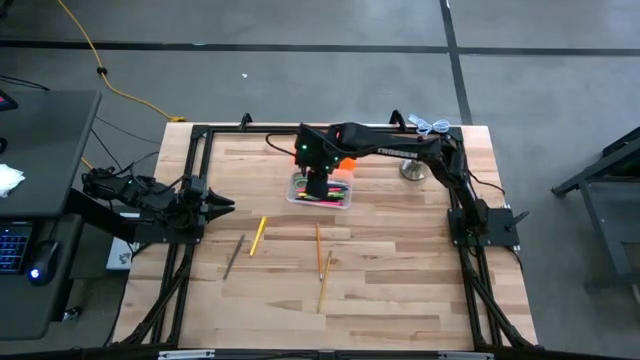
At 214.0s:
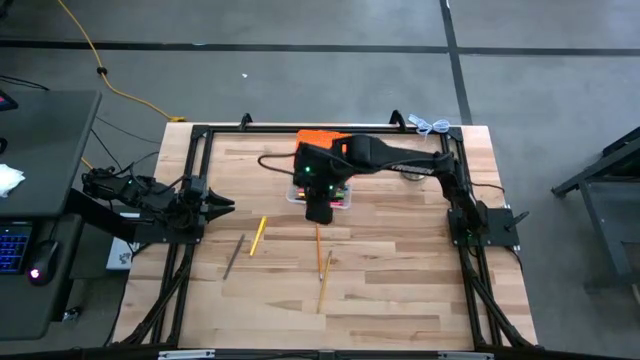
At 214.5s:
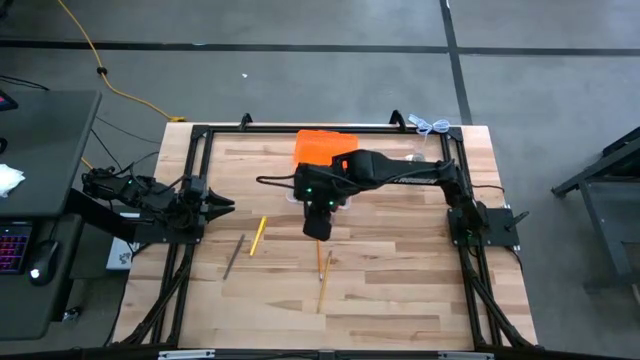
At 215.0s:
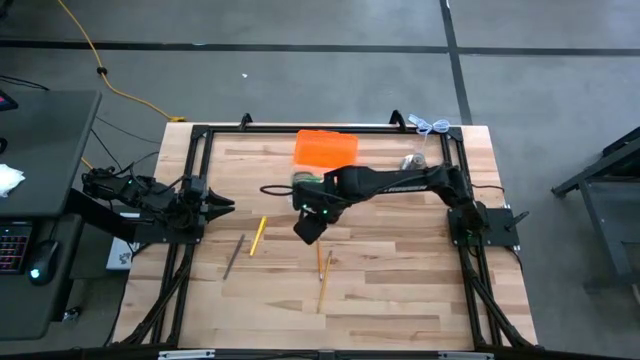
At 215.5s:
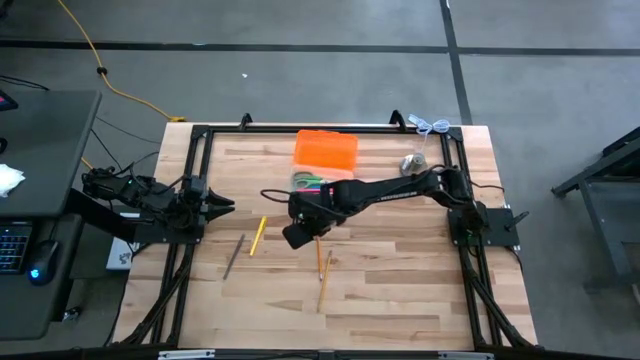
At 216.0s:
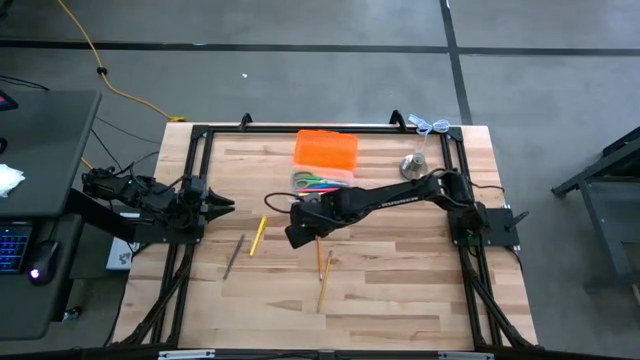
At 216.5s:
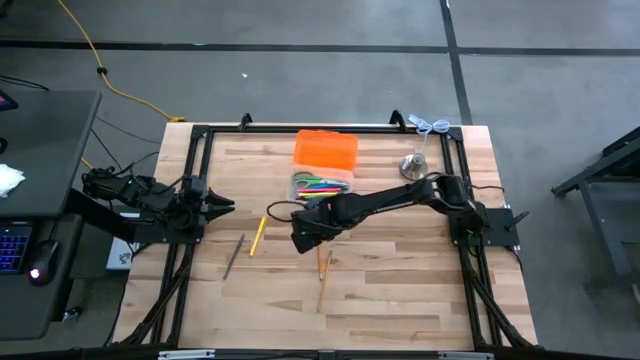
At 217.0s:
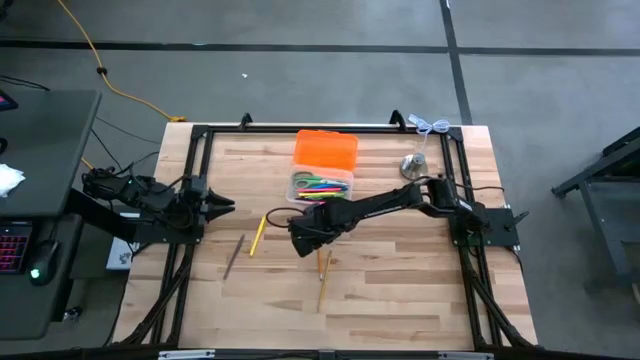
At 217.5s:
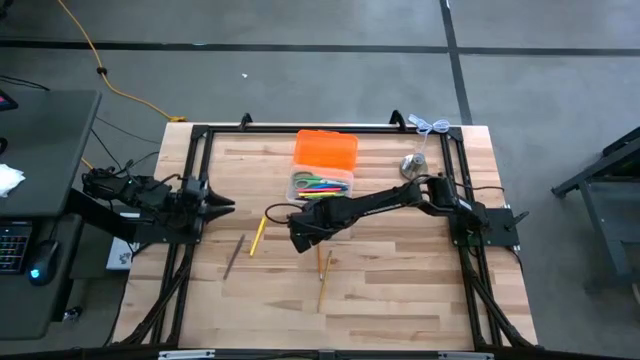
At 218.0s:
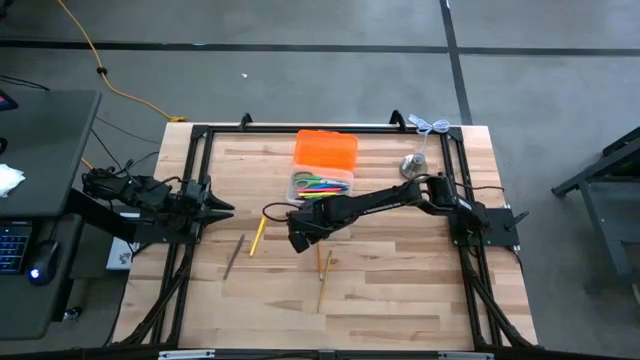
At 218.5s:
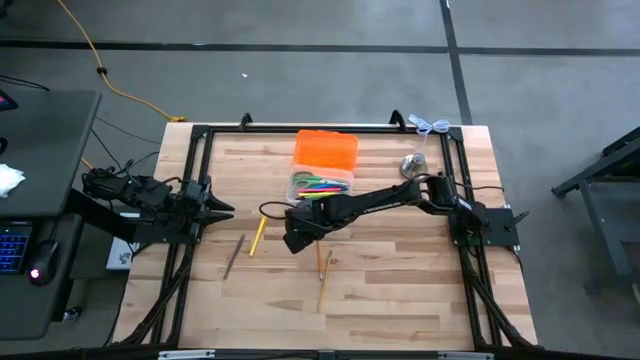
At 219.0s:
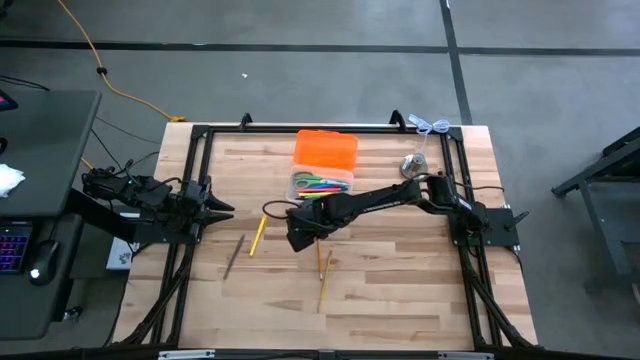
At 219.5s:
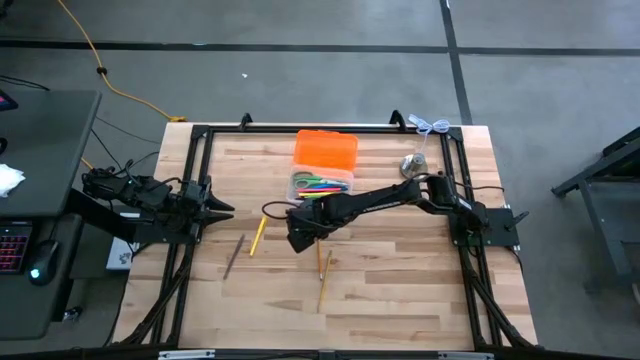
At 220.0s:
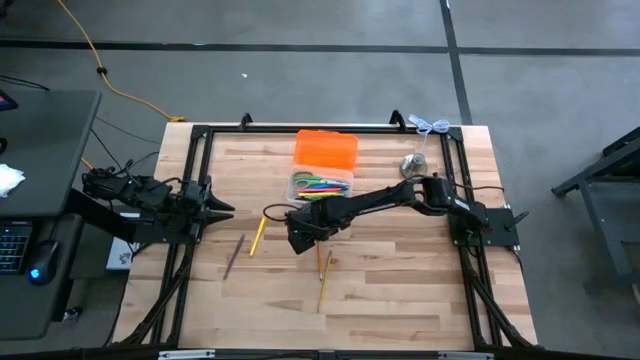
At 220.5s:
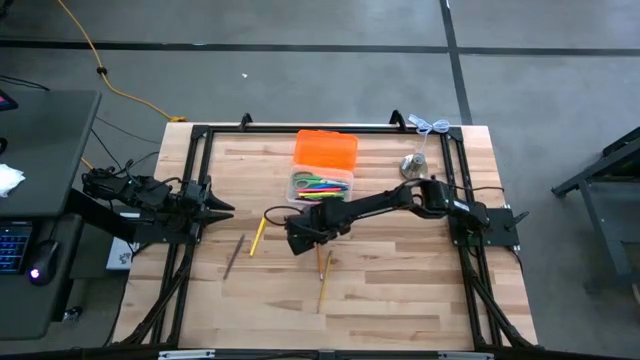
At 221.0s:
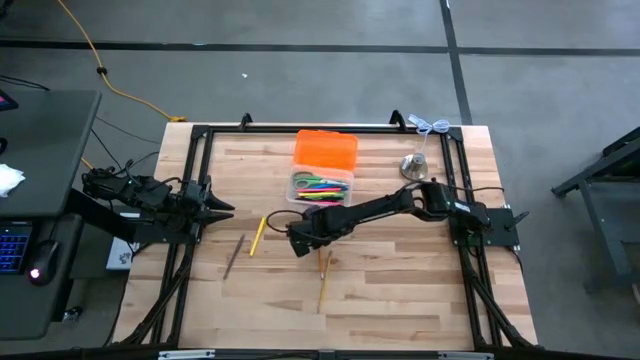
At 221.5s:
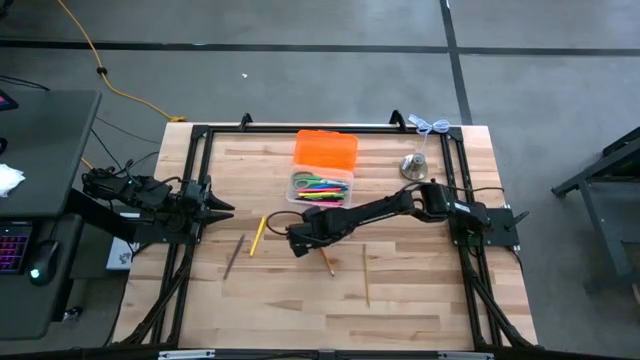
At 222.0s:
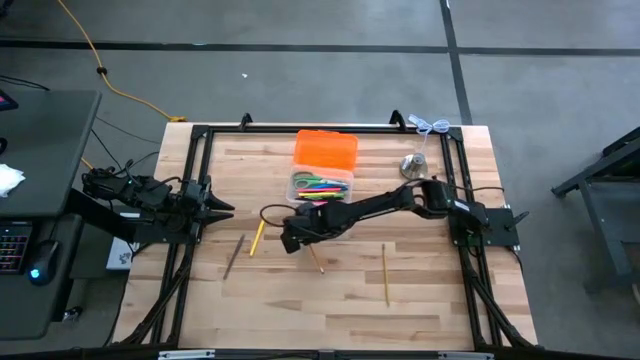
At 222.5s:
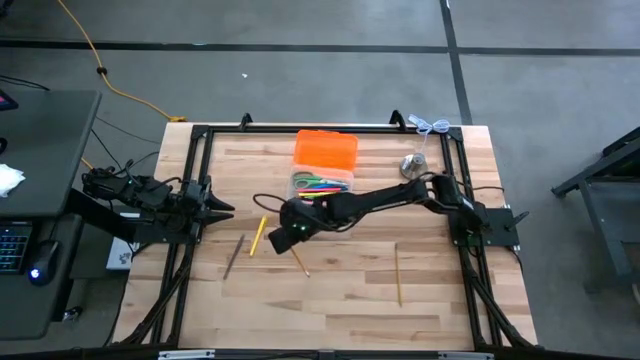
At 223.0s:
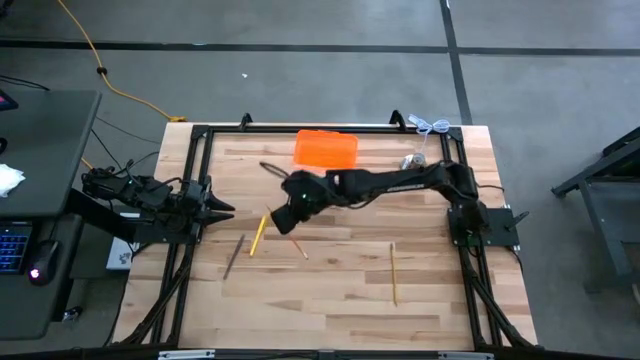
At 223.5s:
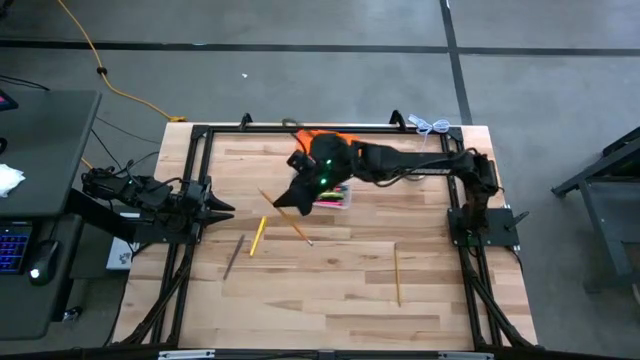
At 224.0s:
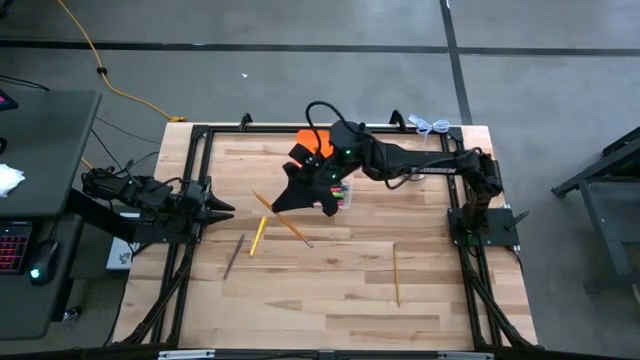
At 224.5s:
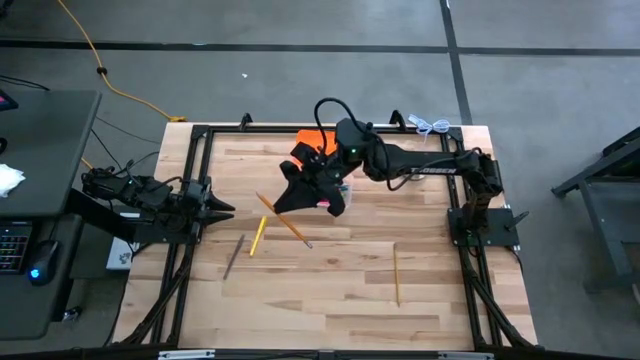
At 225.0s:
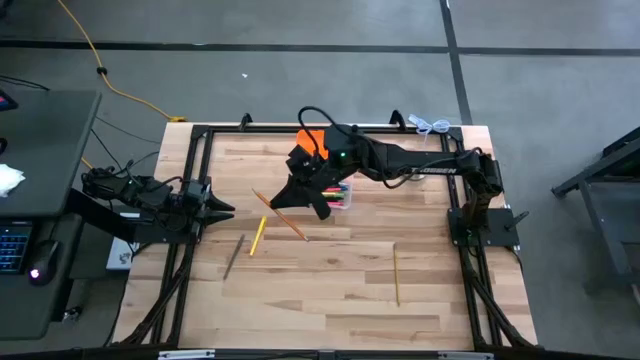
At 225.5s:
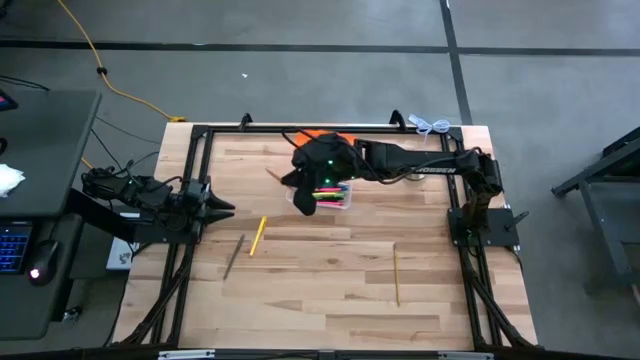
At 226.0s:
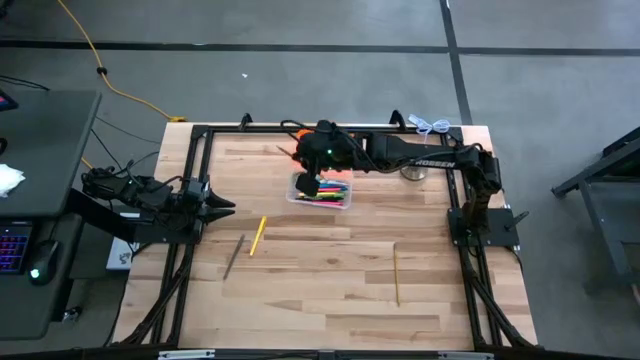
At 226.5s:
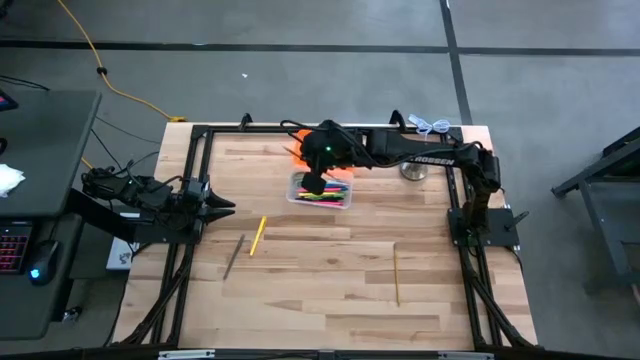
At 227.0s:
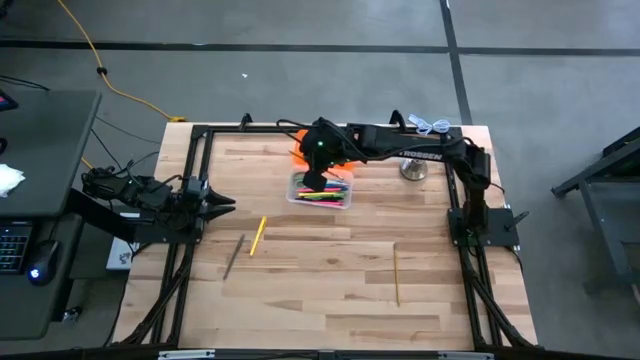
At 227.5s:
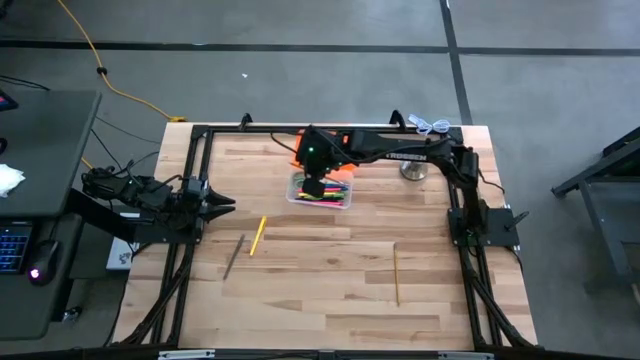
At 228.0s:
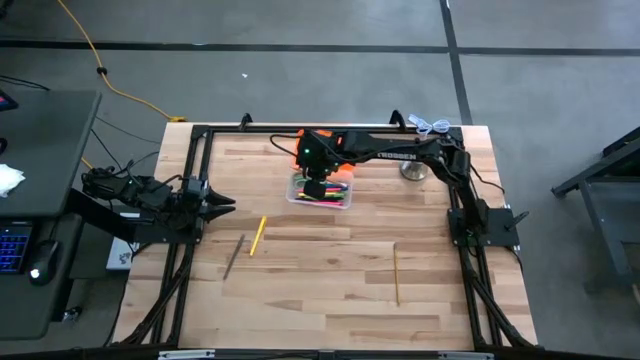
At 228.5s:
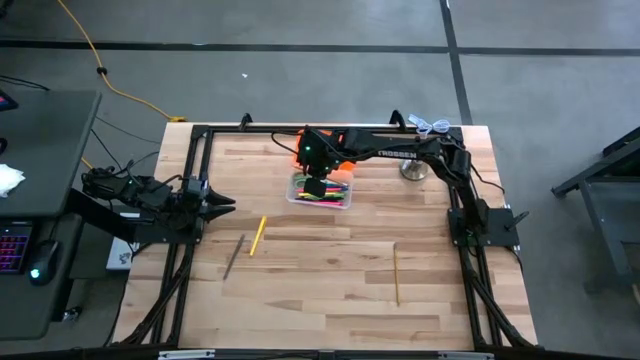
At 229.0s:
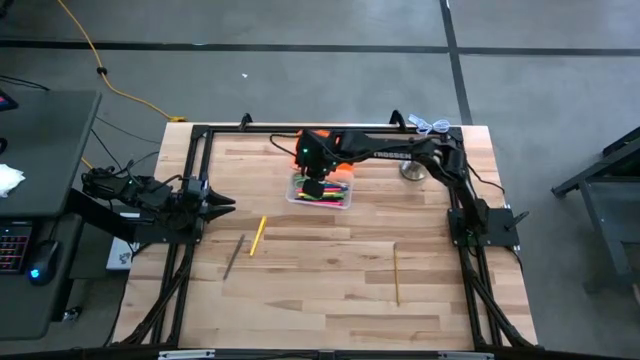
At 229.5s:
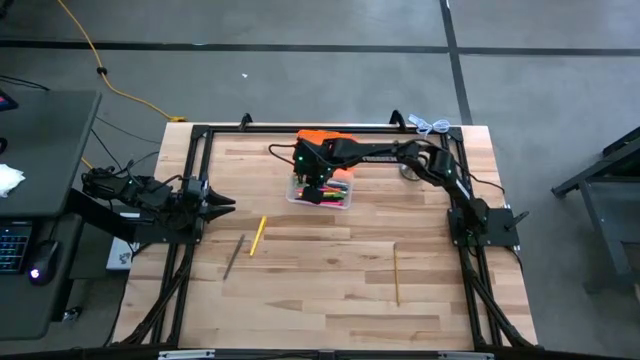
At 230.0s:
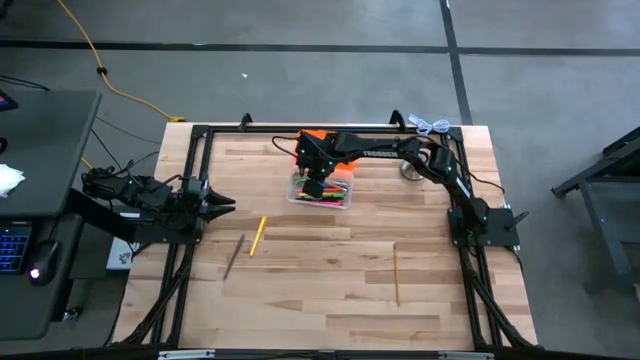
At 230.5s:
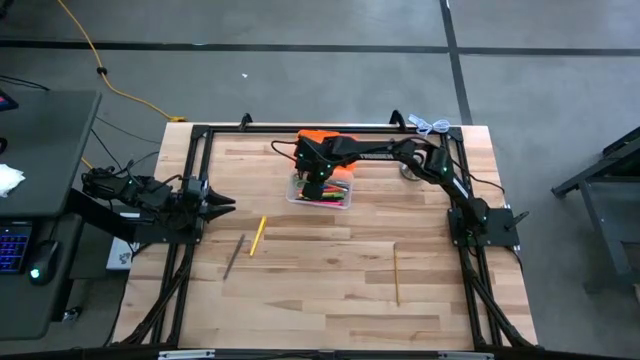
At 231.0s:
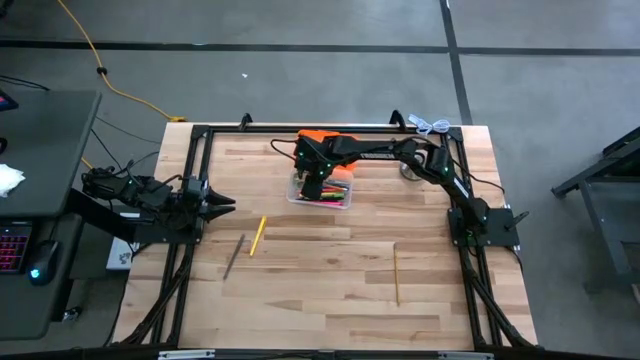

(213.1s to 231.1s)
Task: Pick & place school supplies into a supply box
Put the orange pencil into the transparent supply box

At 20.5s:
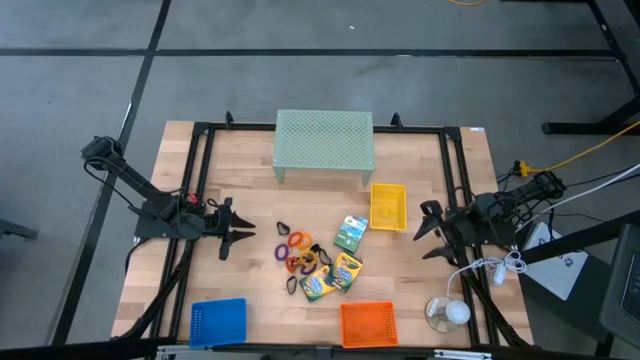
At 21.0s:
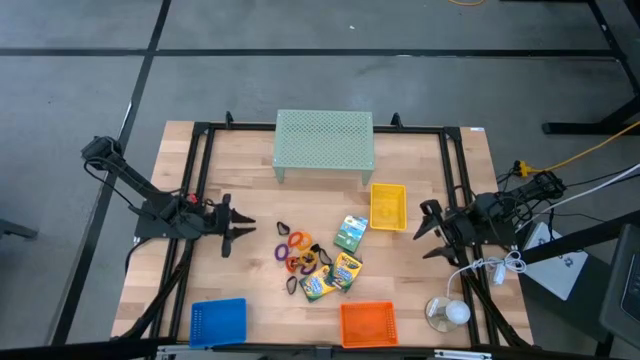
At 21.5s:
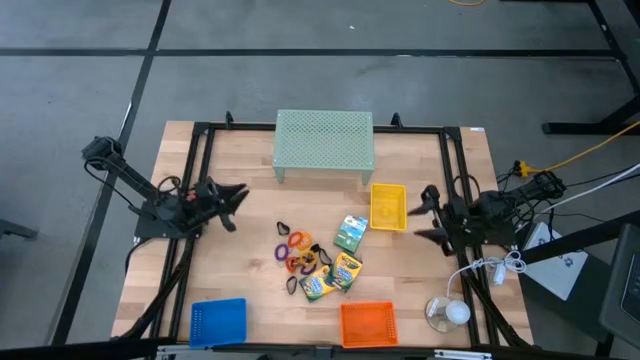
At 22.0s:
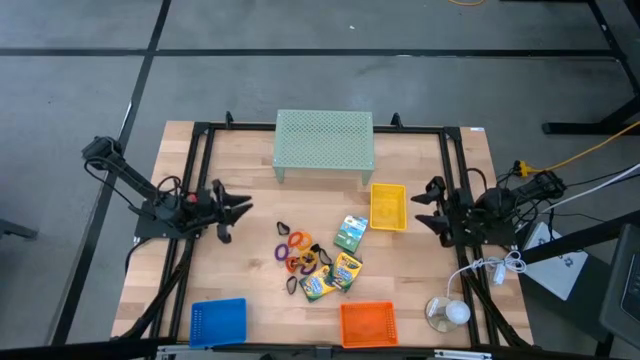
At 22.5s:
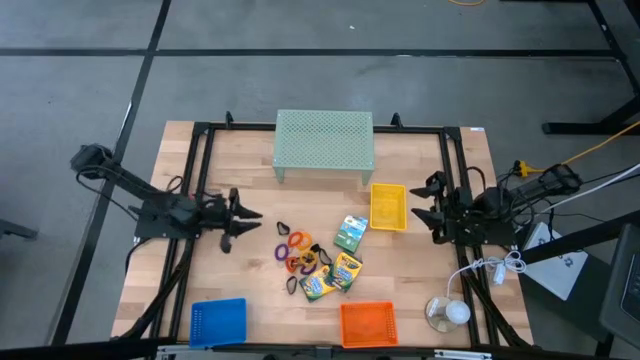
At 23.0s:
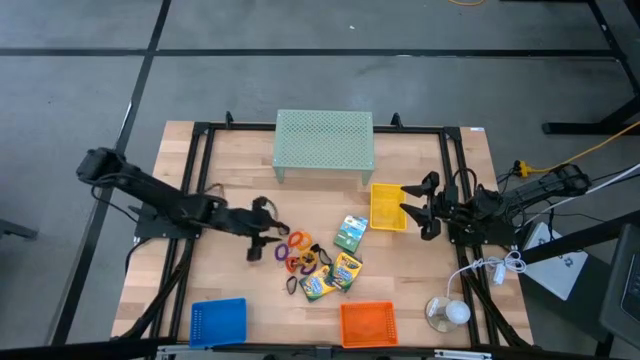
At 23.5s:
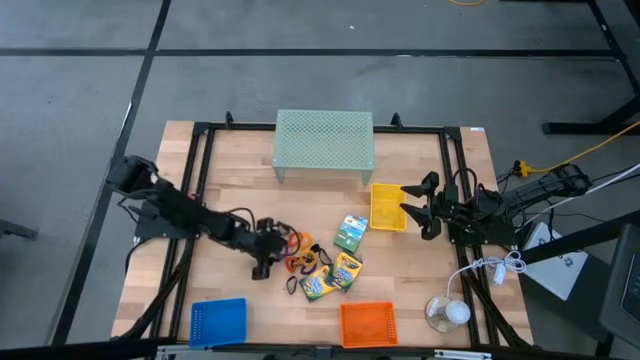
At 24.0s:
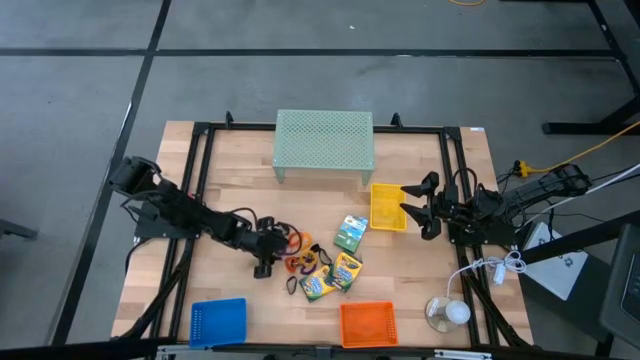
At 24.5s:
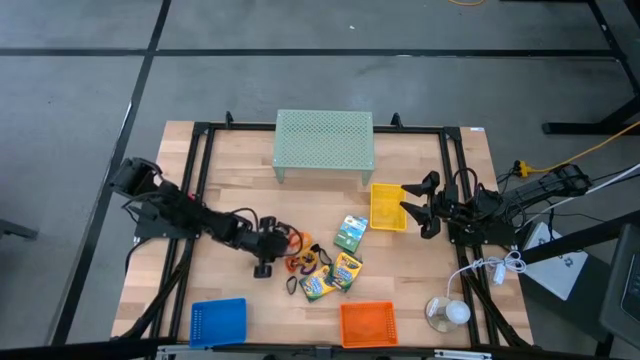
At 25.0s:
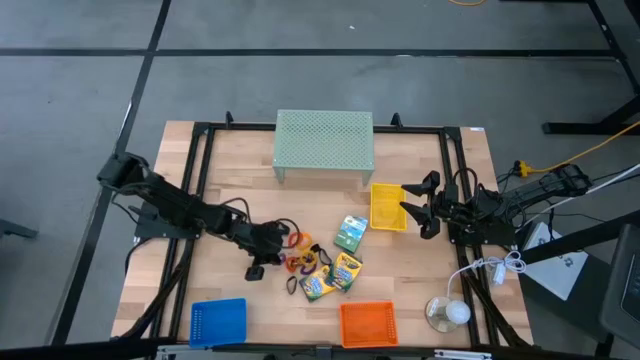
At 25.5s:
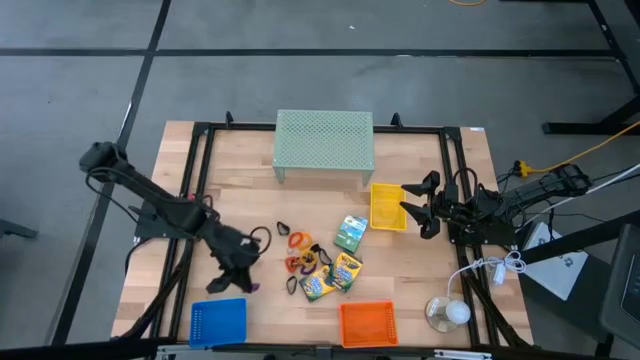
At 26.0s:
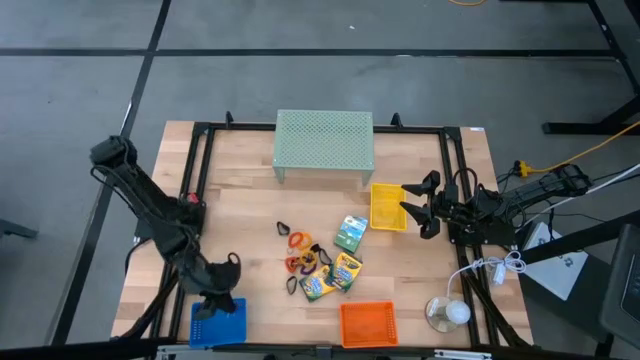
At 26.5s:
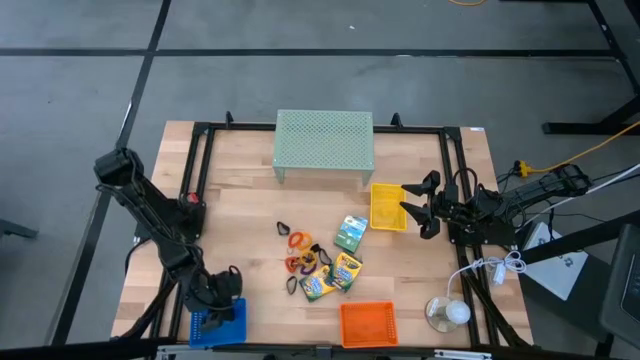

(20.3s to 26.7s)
Task: Pick & Place Office Desk Supplies
Put the violet spring keychain into the blue bin
